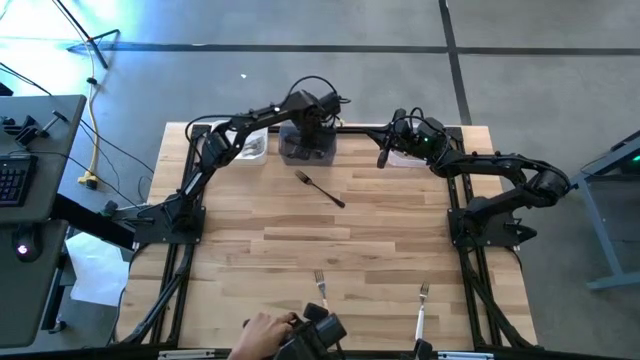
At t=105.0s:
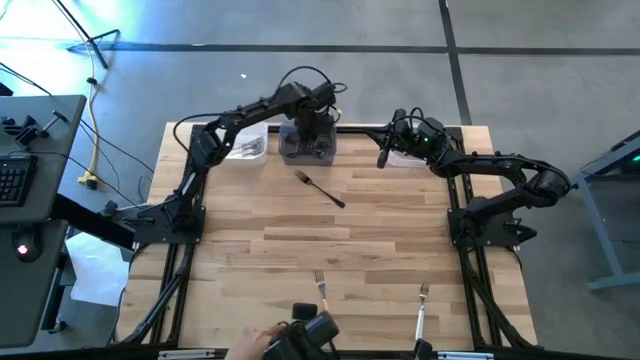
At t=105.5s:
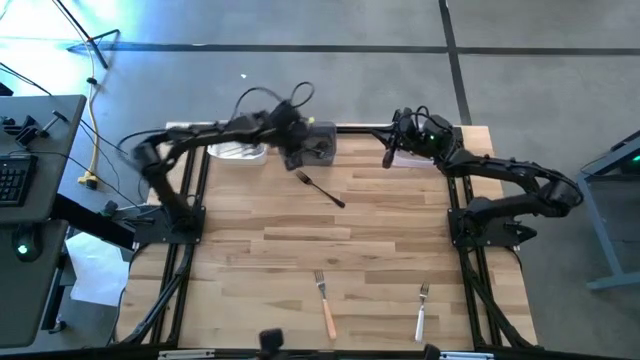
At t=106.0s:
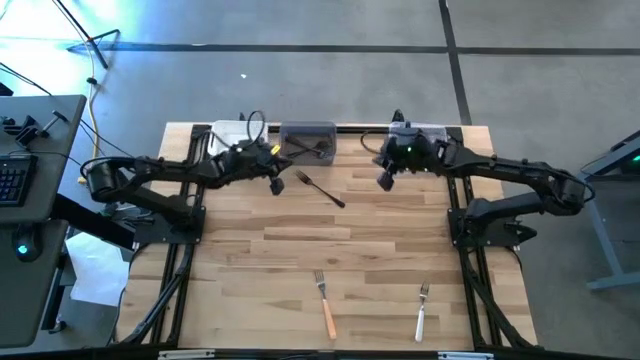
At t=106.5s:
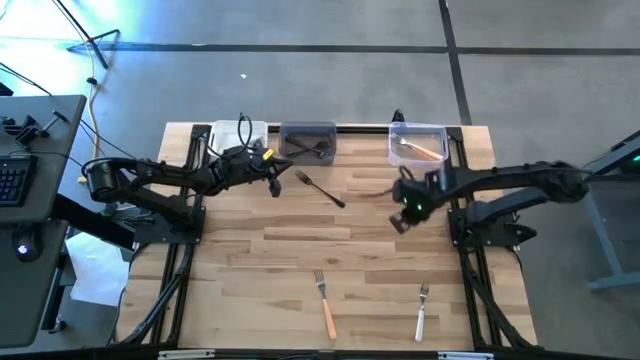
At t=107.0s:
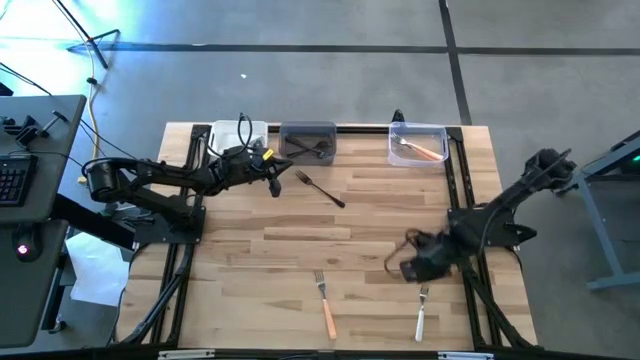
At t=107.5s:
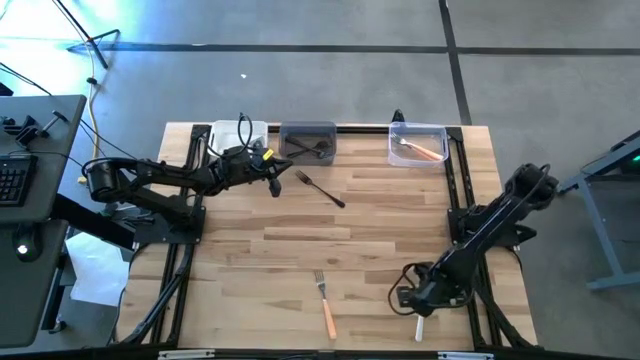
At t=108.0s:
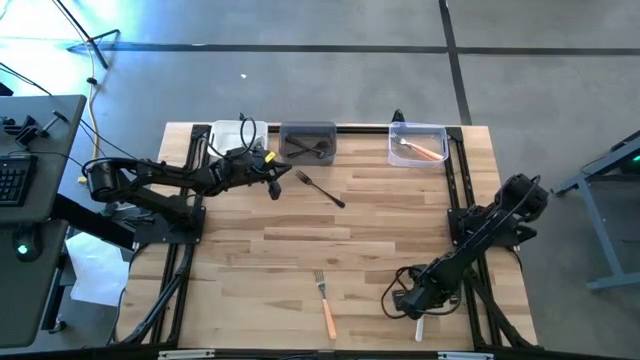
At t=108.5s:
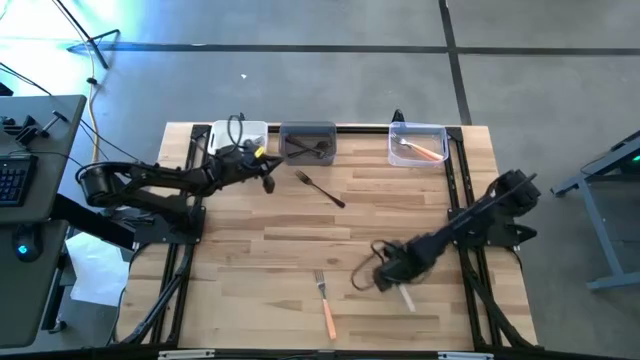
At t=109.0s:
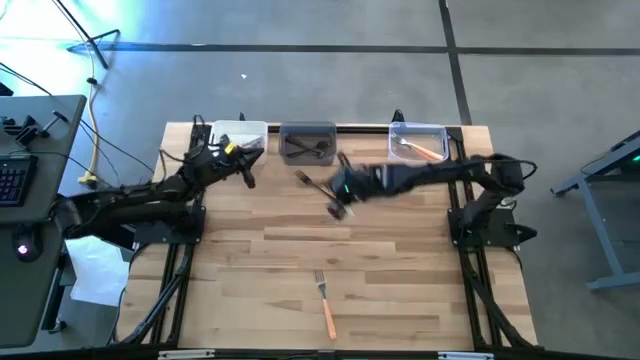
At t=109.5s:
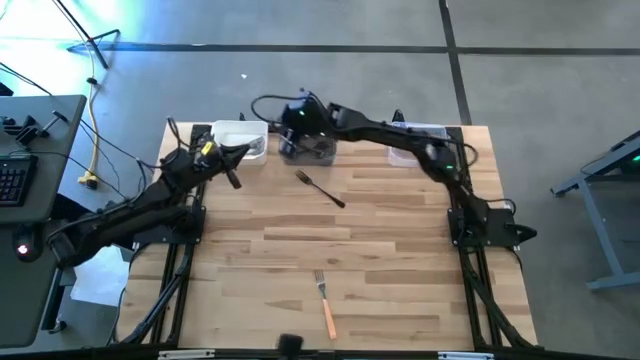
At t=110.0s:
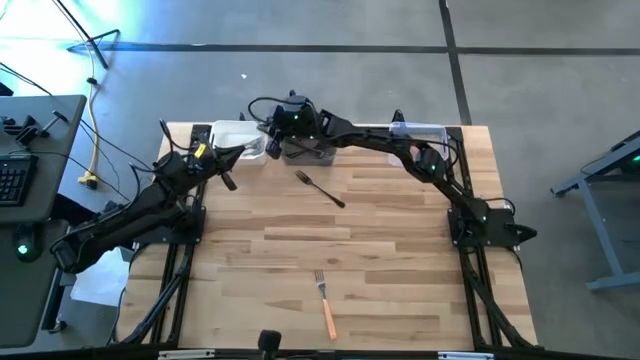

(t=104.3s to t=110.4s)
Task: Sort silverware by color (type)
Put the white fork into the white bin

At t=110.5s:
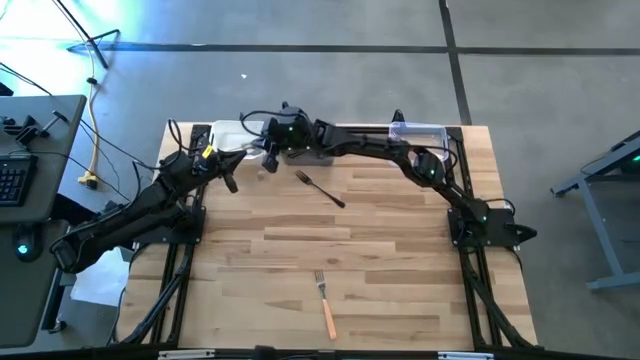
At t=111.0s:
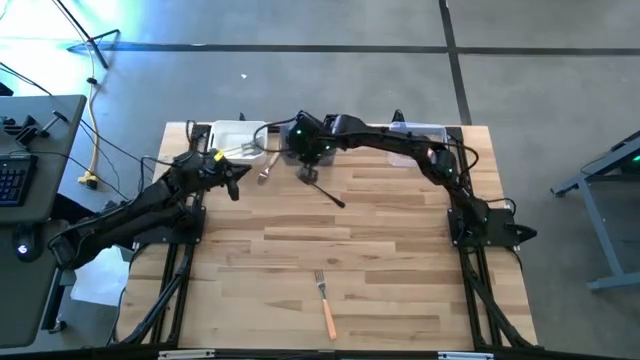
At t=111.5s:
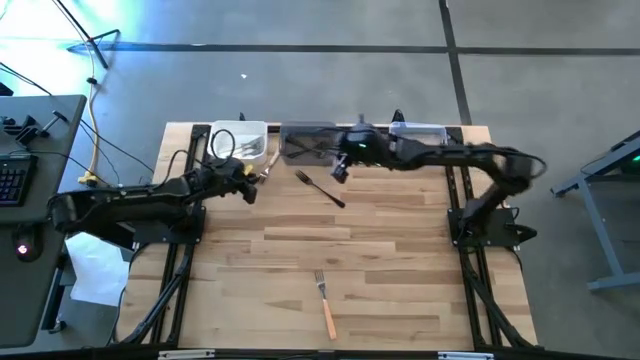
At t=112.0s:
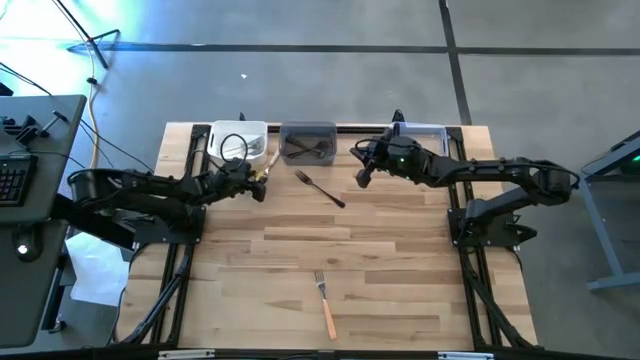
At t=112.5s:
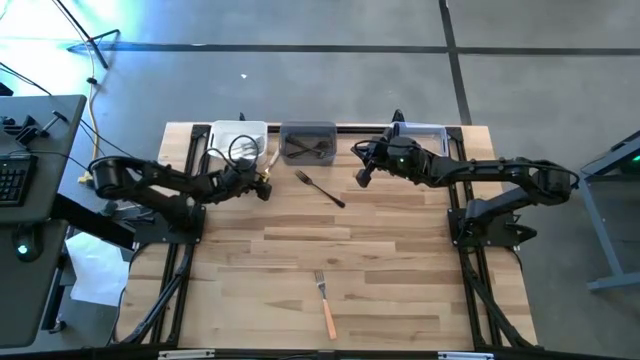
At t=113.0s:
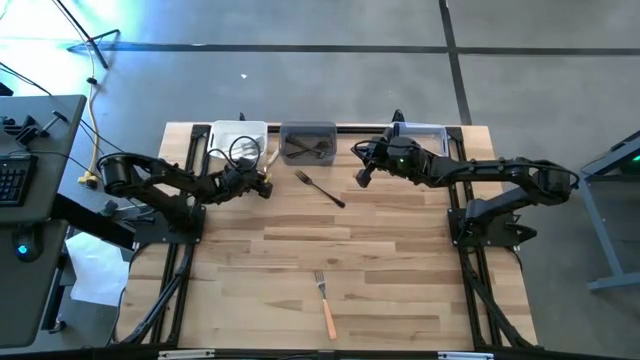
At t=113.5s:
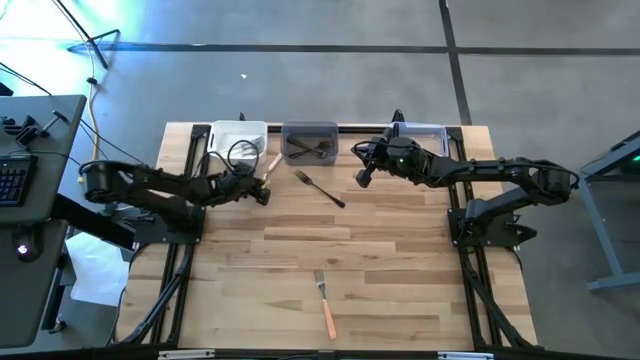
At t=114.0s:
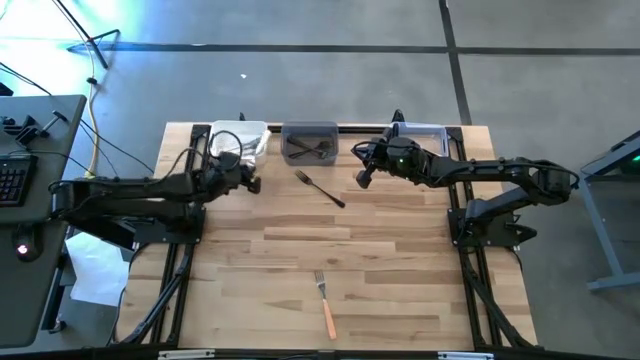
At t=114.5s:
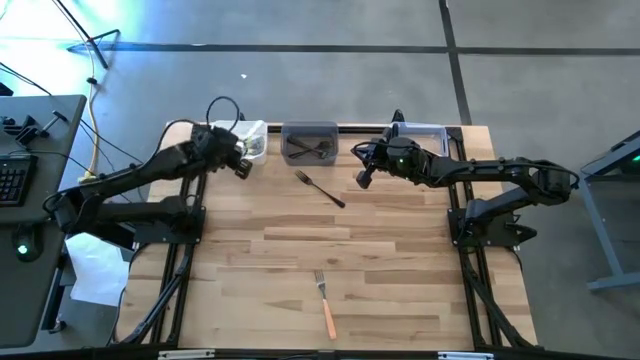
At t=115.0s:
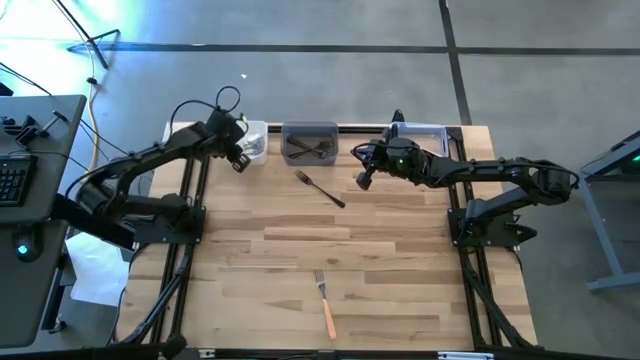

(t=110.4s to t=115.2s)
Put the white fork into the white bin

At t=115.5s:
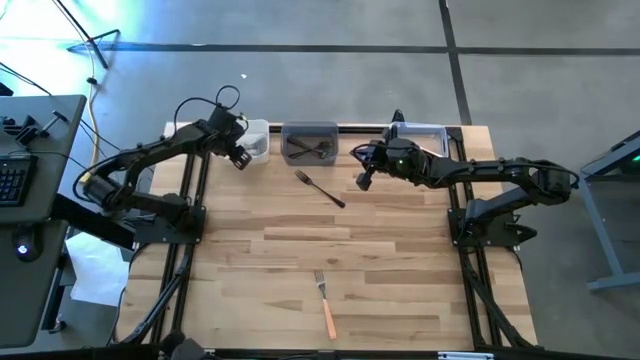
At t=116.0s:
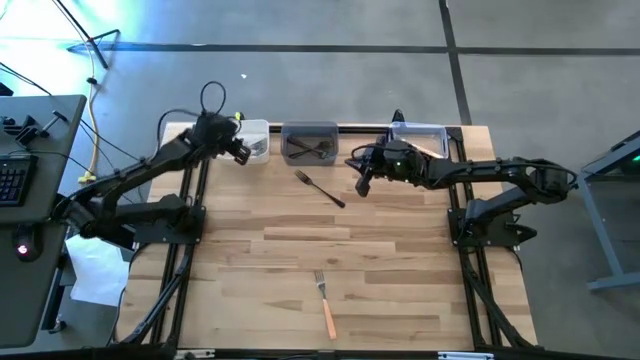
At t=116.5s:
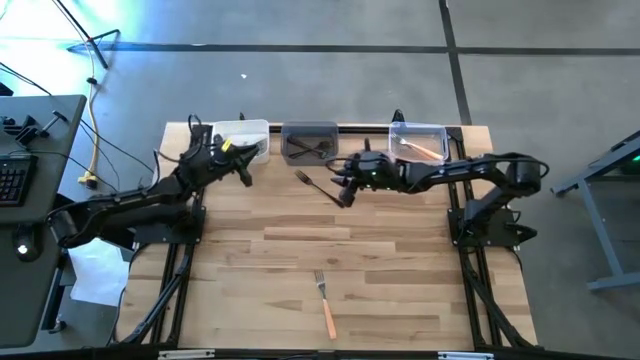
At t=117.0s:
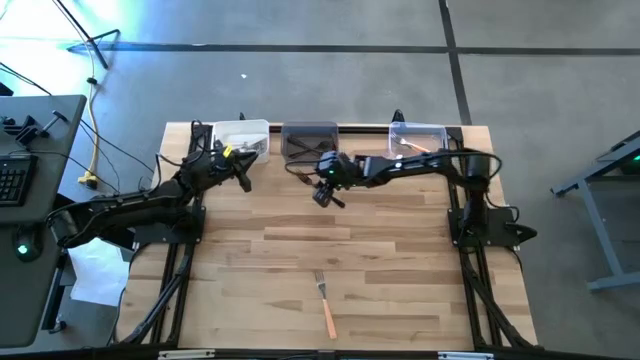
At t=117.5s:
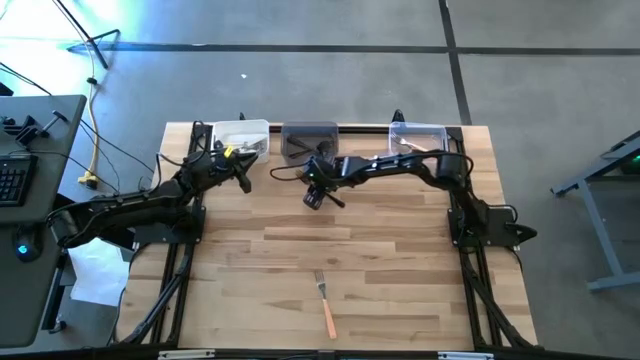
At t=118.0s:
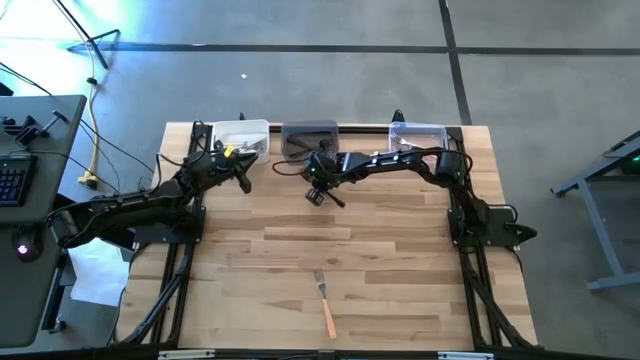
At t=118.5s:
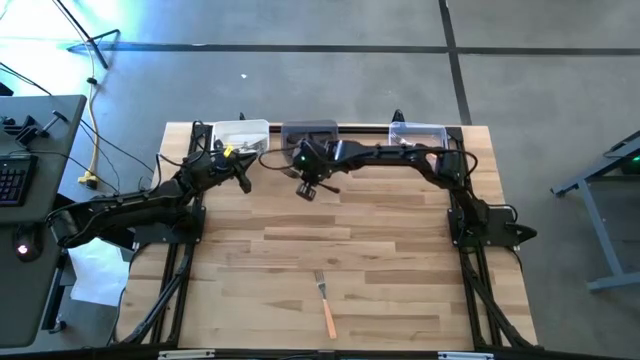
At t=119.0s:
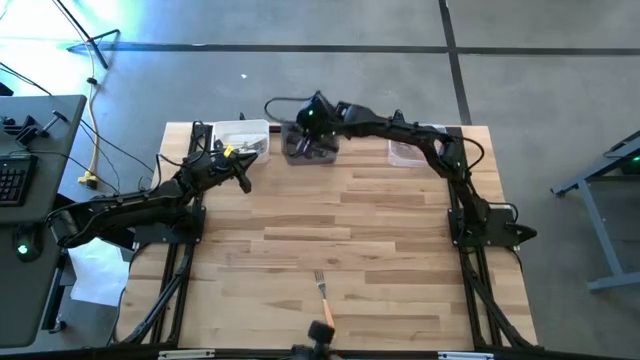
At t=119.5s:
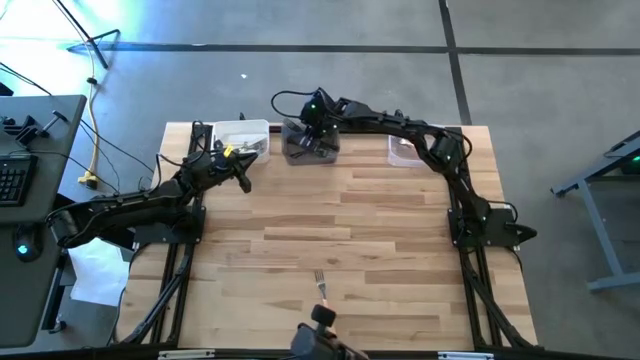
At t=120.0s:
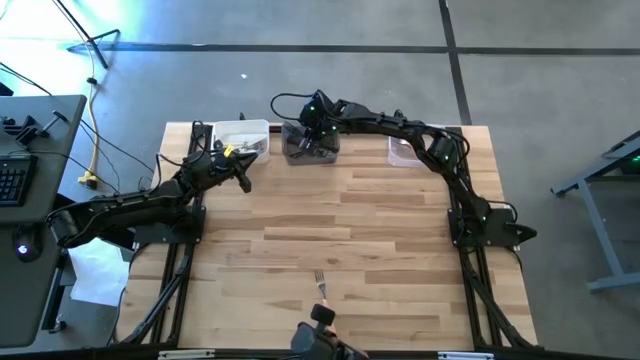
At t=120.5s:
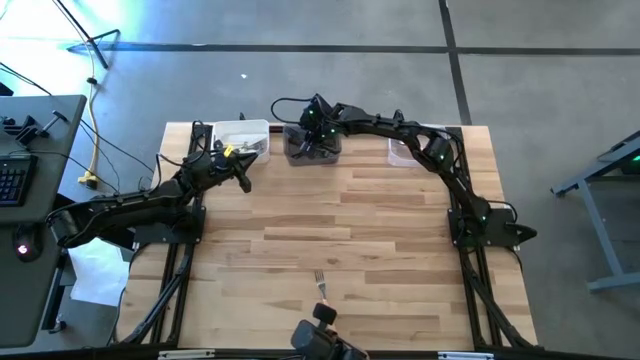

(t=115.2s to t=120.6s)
Put the black fork into the black bin

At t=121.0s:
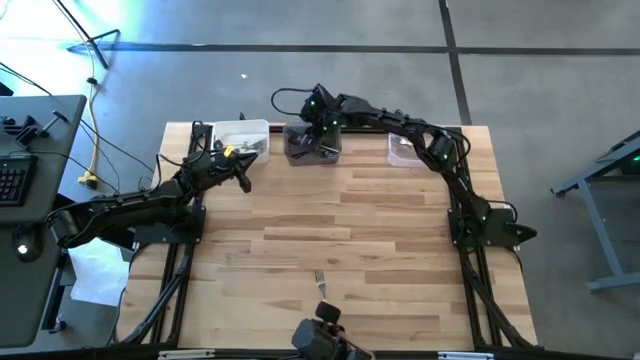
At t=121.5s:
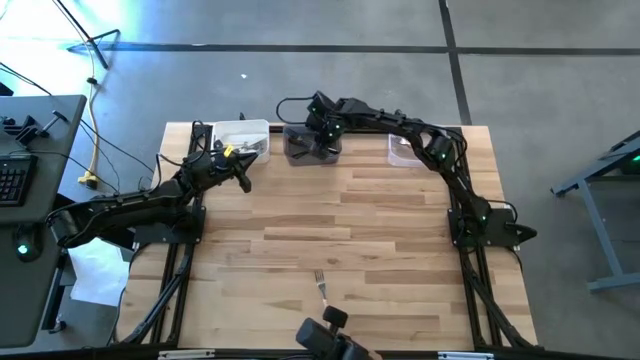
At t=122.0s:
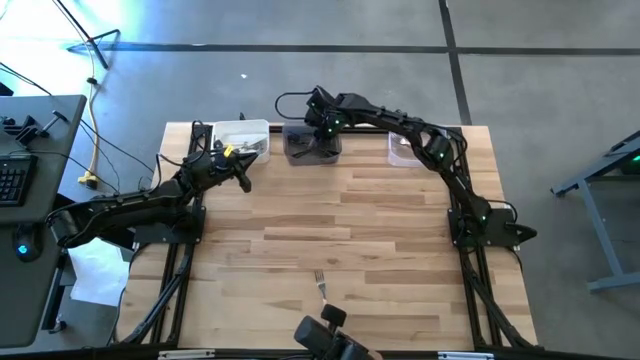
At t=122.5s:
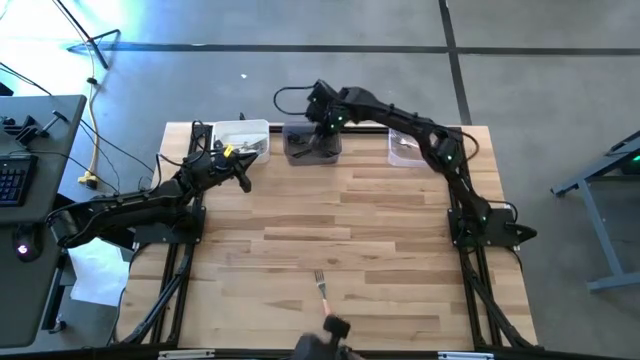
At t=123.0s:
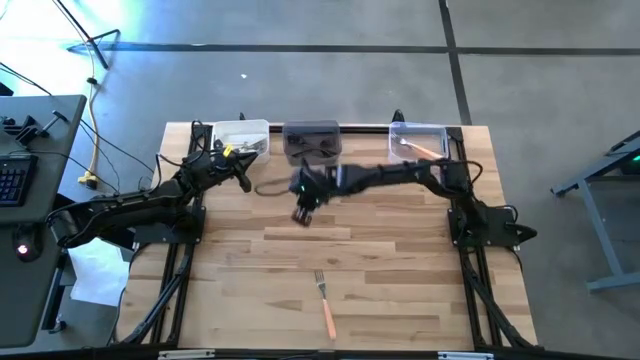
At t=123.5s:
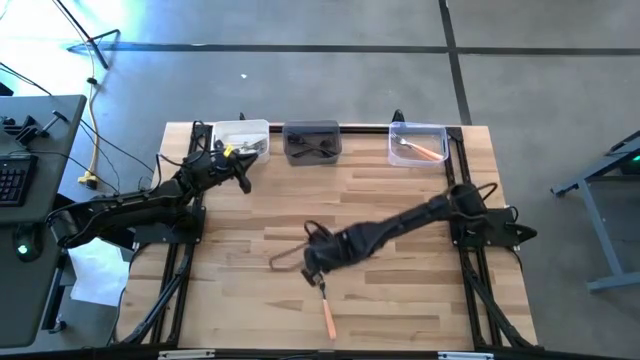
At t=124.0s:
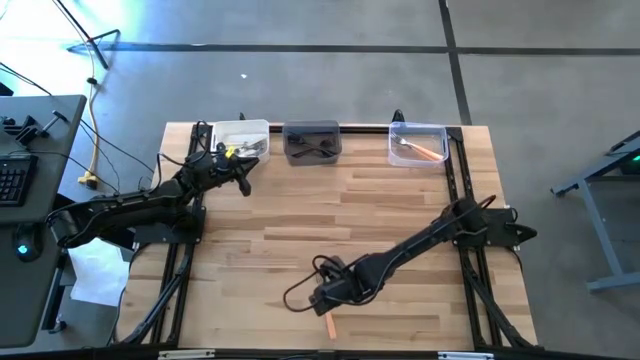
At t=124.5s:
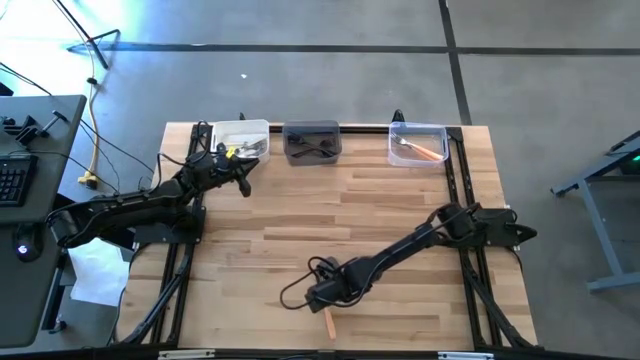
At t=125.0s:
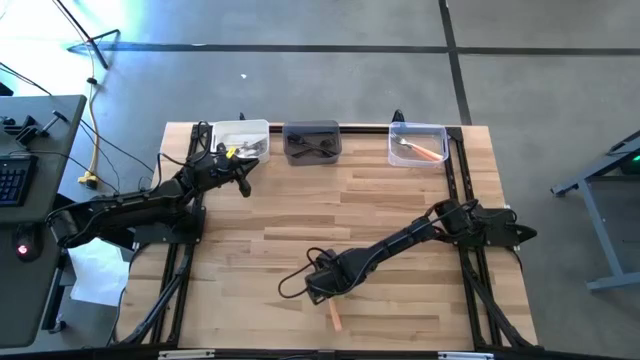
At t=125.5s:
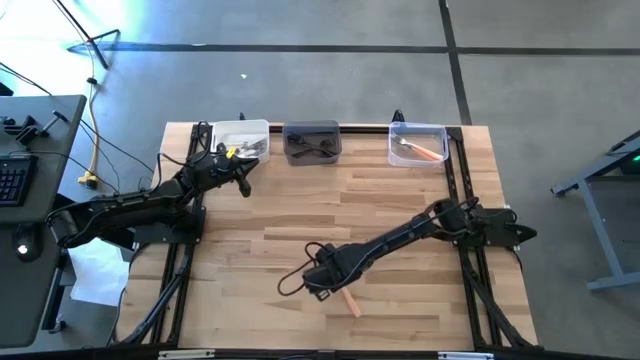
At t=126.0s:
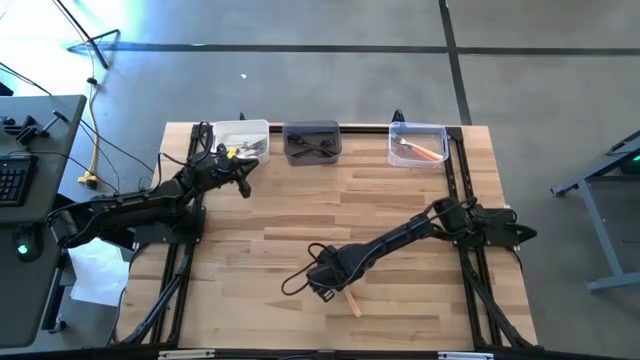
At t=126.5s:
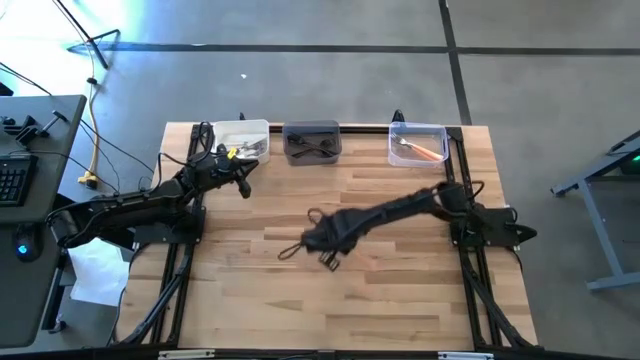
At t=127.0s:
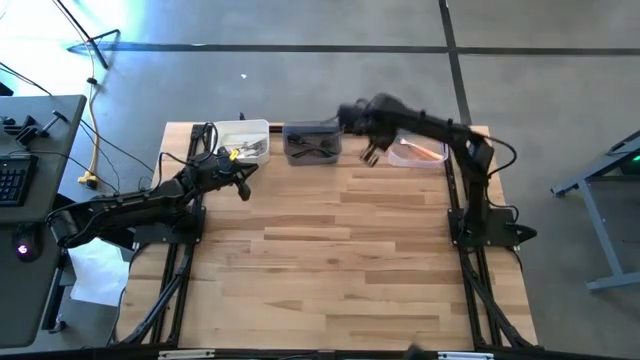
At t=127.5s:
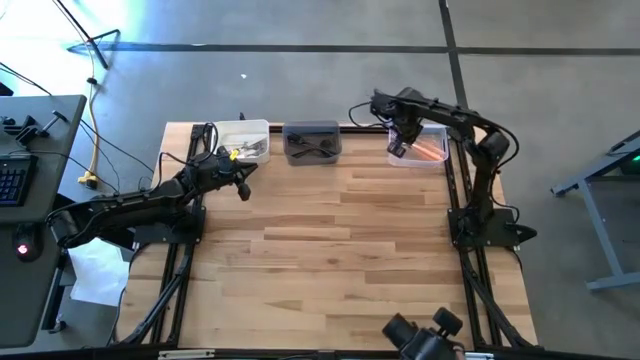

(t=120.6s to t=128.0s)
Put the orange fork into the transparent bin
